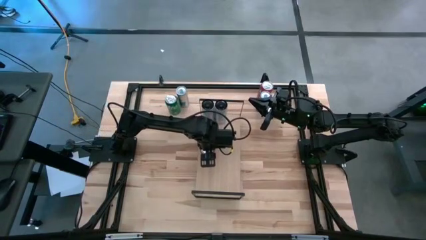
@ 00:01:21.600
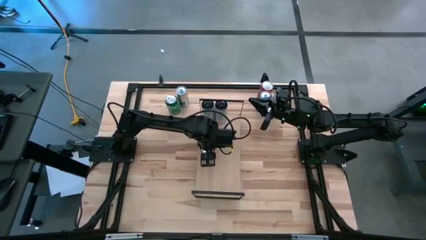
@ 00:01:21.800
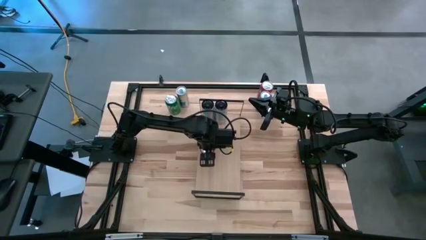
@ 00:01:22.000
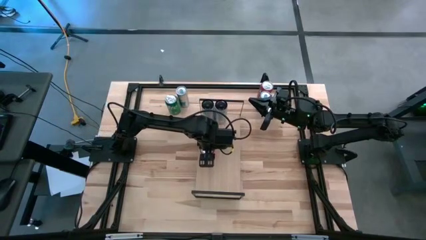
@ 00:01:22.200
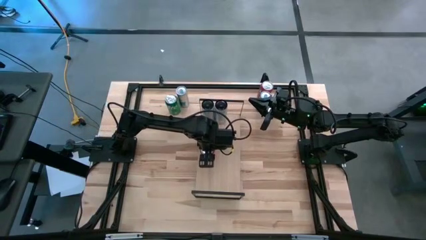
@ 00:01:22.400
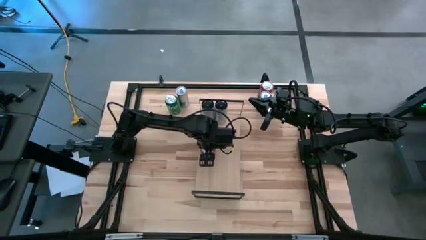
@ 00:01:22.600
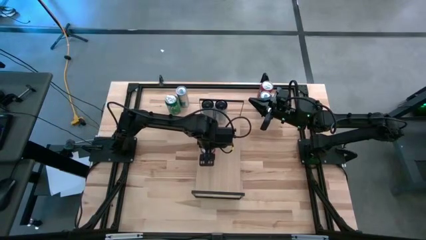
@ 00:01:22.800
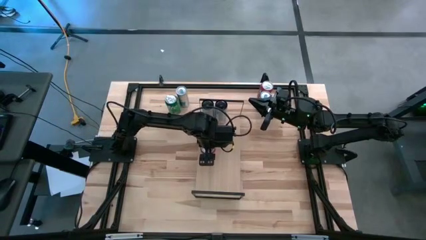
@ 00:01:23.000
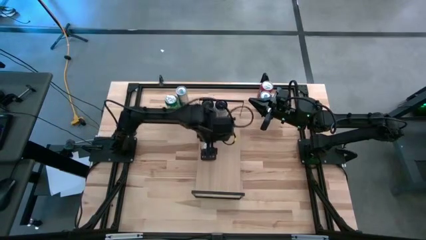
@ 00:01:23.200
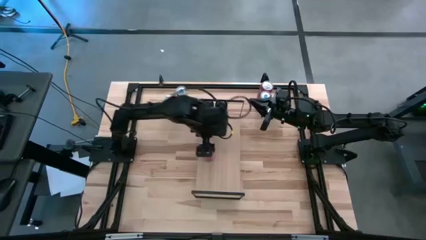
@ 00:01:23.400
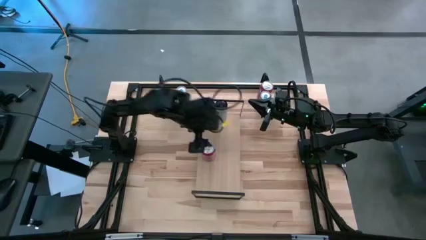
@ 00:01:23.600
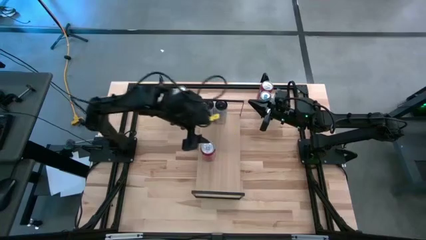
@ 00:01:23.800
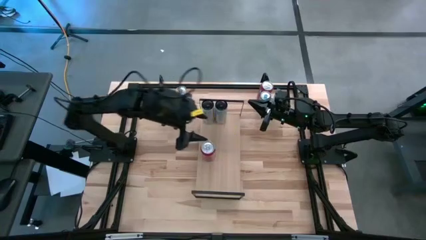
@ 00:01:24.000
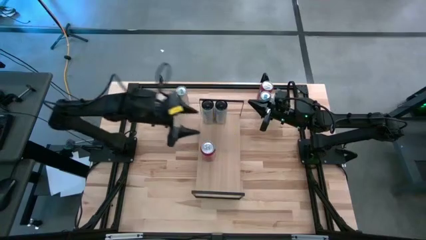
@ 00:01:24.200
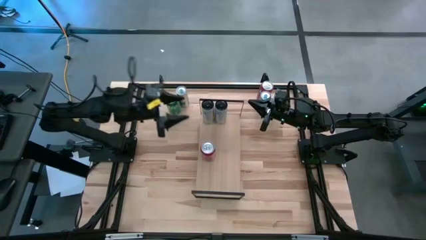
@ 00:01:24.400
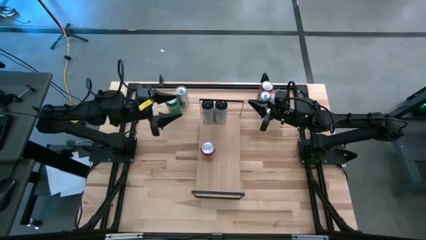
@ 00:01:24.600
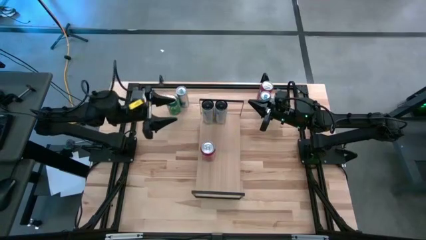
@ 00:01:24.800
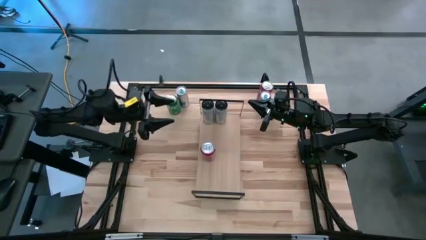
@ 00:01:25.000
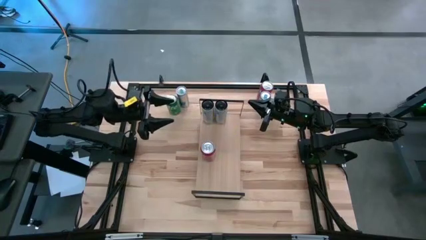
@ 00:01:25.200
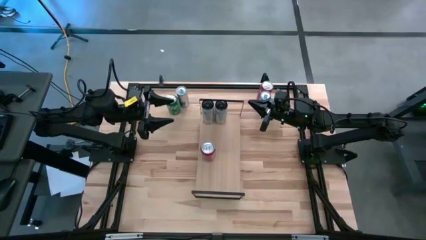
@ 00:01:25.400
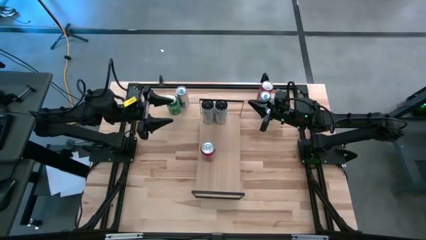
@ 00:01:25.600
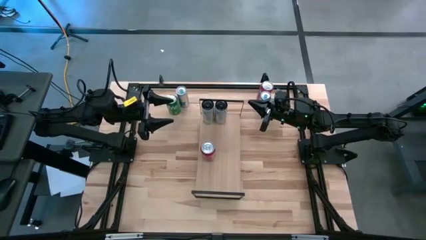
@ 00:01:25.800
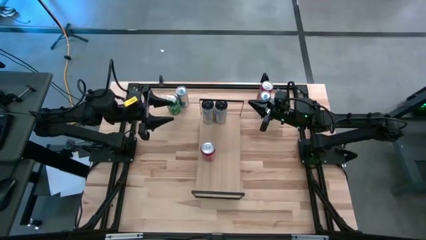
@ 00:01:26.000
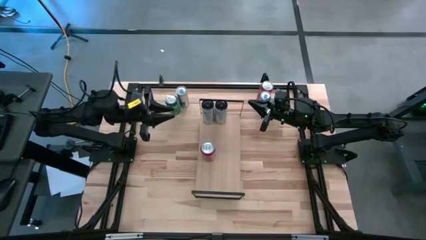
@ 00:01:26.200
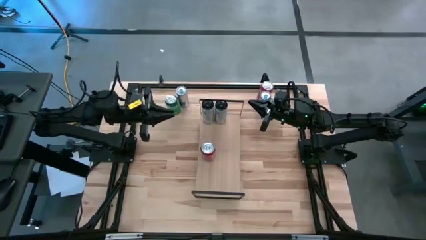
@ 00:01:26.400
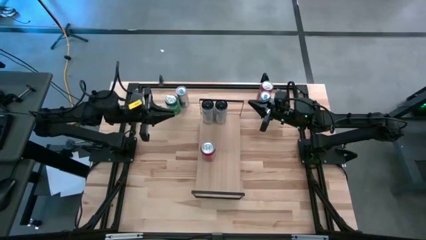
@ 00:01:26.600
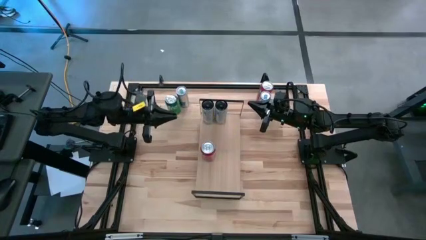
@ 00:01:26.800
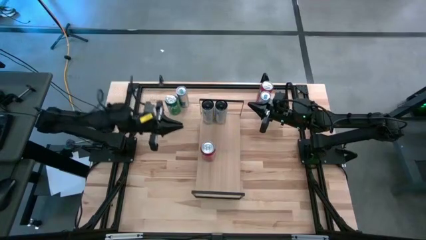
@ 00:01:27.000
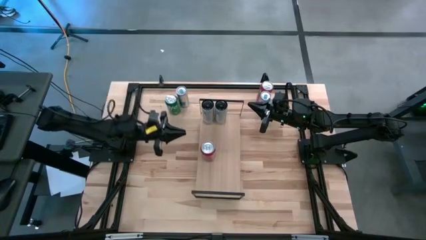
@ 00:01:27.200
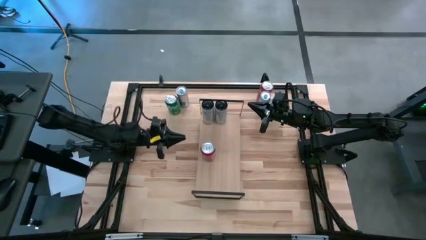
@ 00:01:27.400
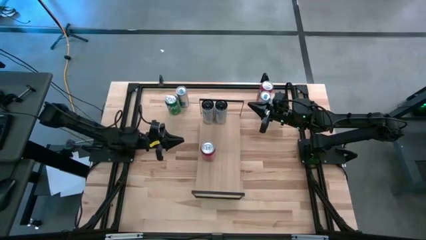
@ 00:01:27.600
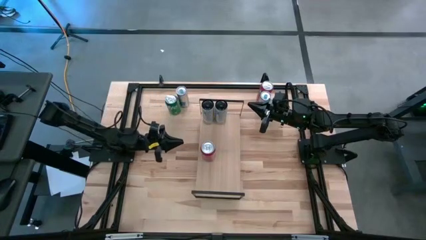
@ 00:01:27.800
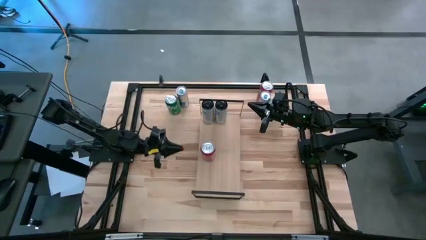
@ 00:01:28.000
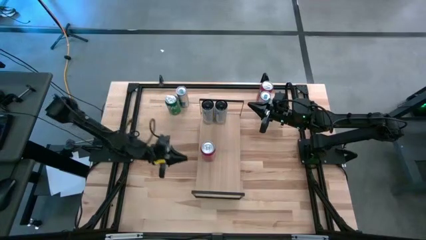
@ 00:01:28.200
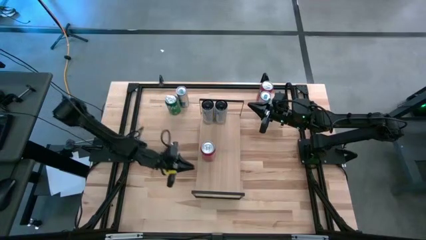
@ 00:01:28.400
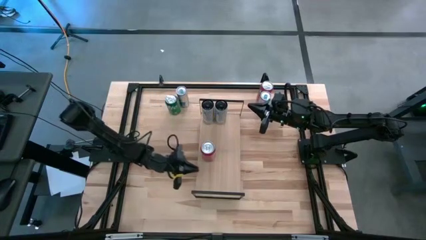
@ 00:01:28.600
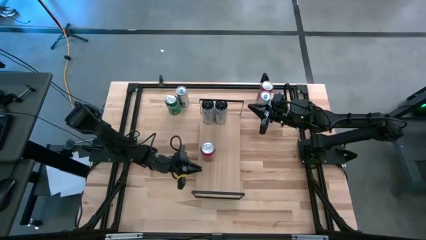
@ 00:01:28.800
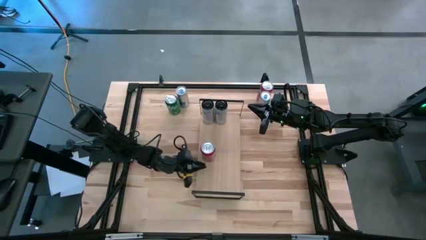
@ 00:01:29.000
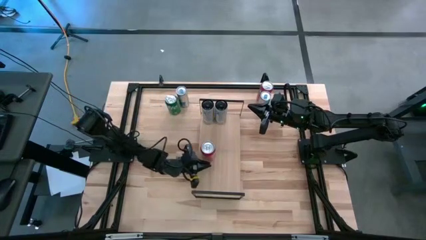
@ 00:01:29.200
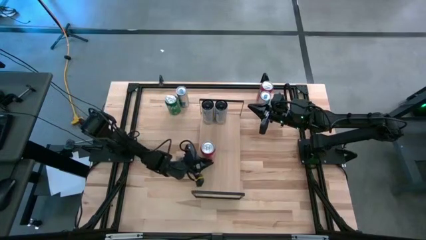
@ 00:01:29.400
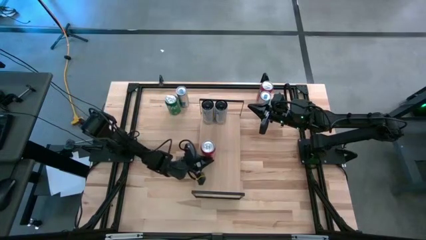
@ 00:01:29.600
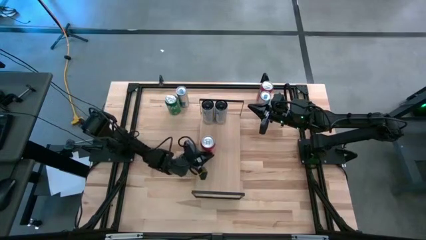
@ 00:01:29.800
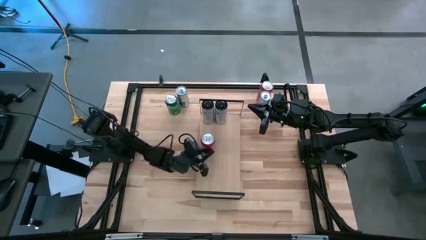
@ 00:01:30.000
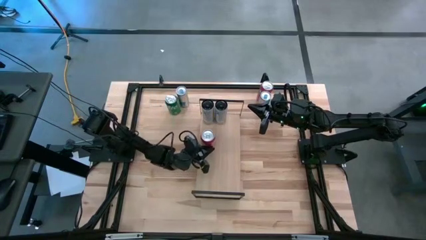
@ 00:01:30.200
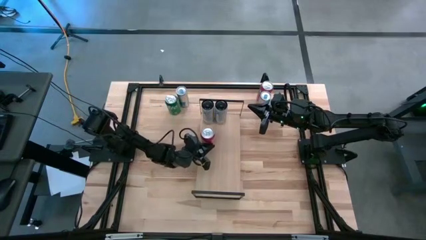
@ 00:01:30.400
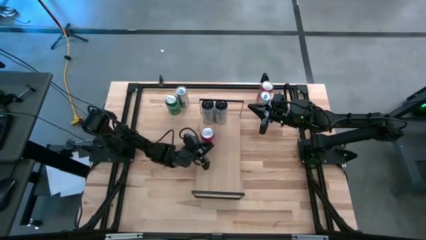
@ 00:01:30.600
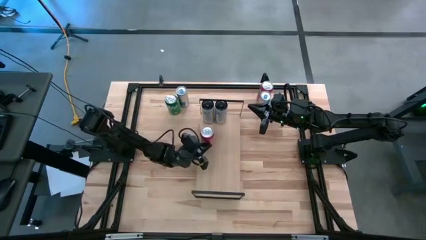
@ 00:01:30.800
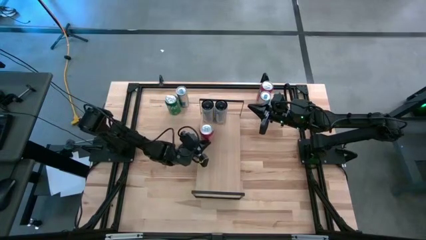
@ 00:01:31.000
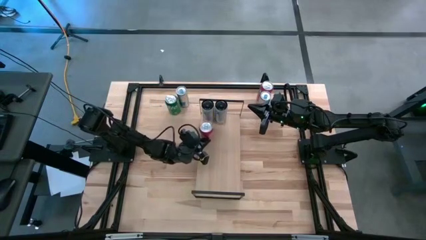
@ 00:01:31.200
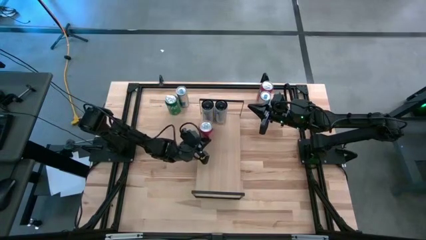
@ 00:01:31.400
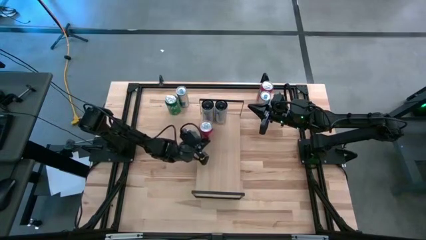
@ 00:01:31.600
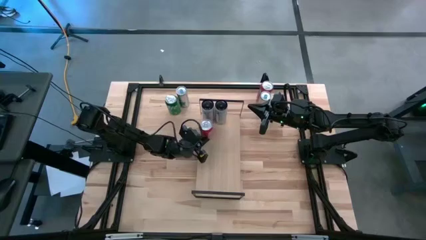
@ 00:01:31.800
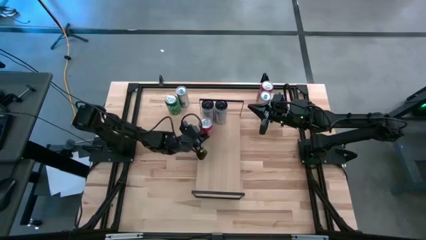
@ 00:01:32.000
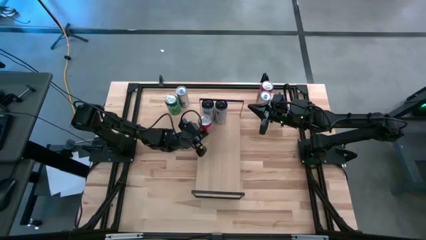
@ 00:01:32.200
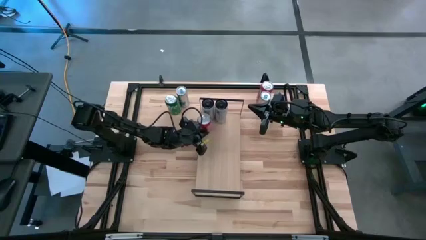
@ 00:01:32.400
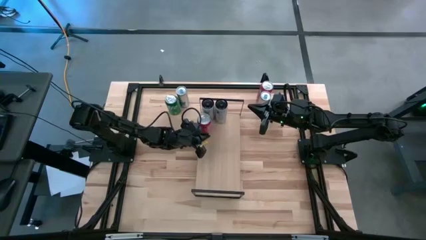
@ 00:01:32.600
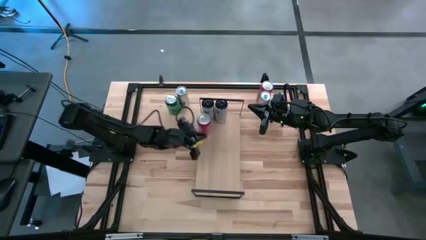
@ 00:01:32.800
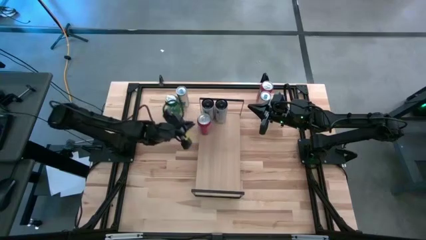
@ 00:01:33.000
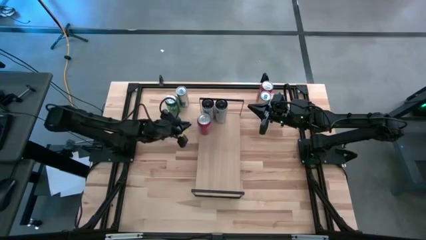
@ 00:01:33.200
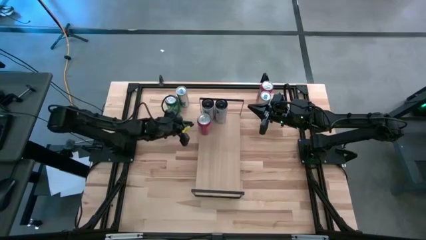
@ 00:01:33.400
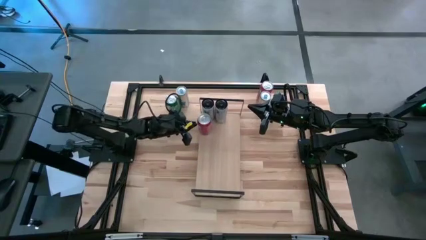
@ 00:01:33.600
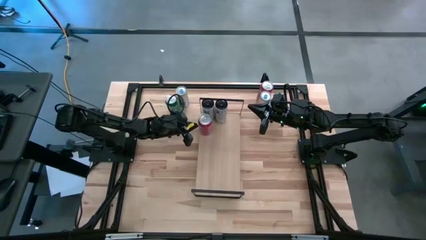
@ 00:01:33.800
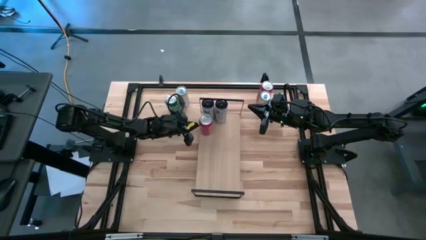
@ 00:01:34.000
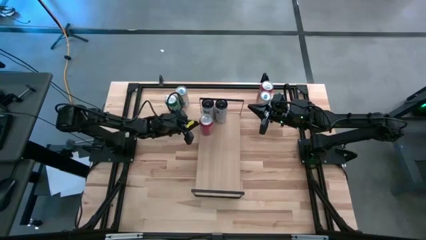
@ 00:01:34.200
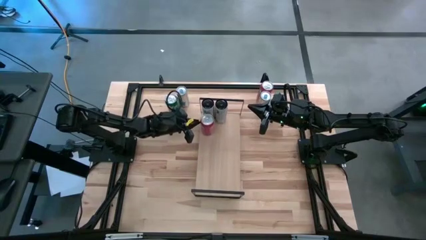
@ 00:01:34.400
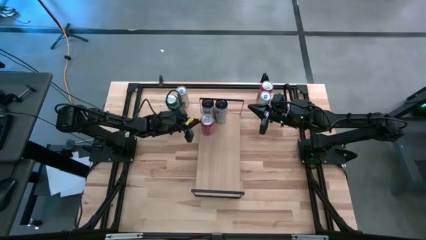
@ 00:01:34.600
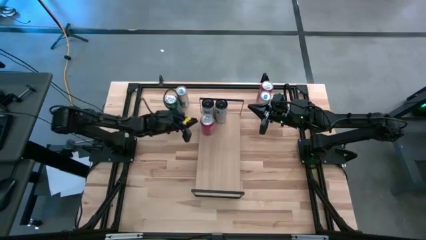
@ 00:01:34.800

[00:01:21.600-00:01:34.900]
Task: Place canned beverage on shelf
Put the left red soda can on the shelf
